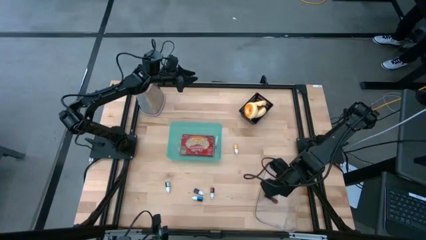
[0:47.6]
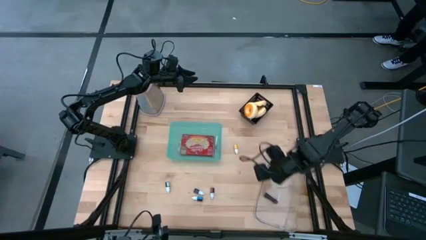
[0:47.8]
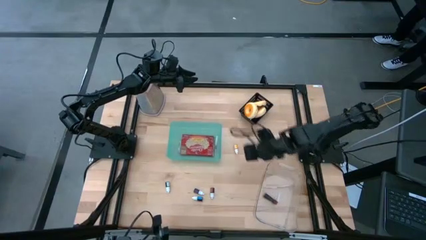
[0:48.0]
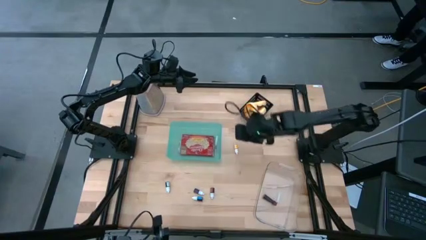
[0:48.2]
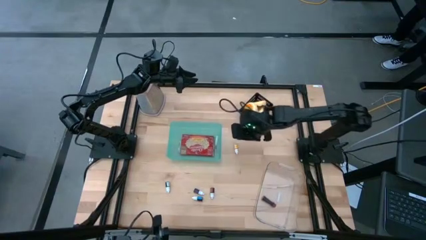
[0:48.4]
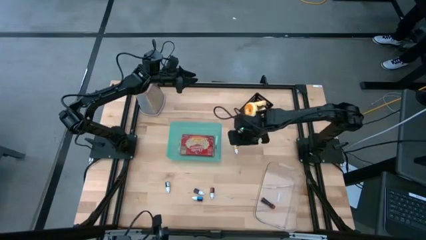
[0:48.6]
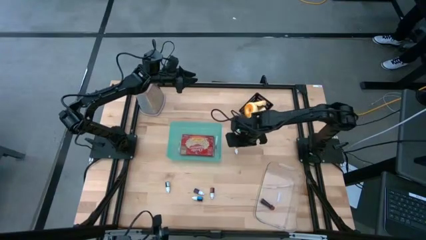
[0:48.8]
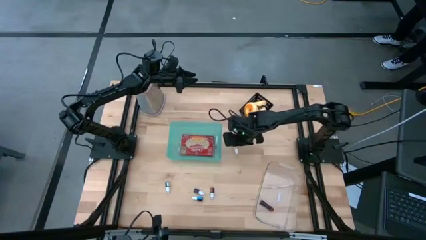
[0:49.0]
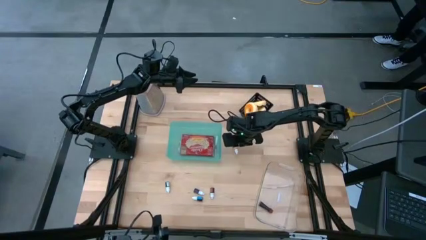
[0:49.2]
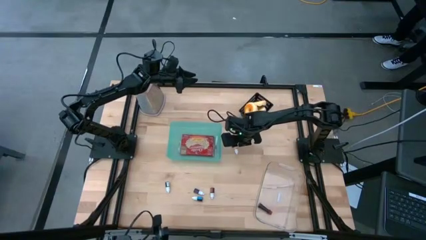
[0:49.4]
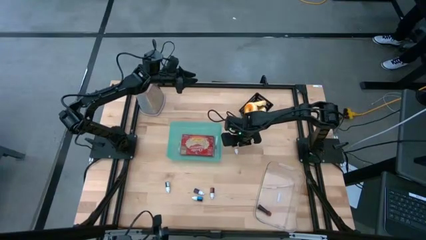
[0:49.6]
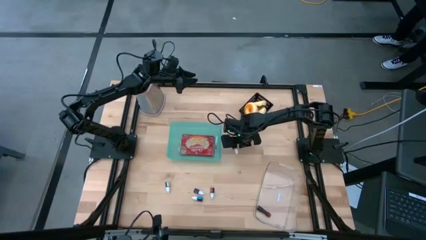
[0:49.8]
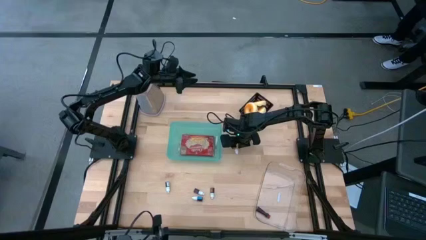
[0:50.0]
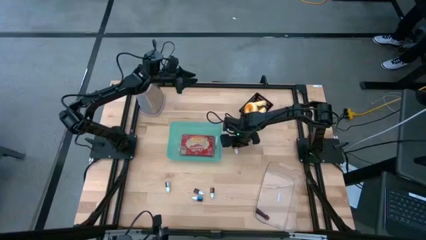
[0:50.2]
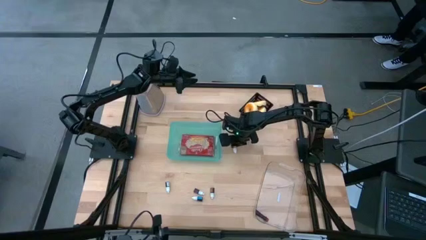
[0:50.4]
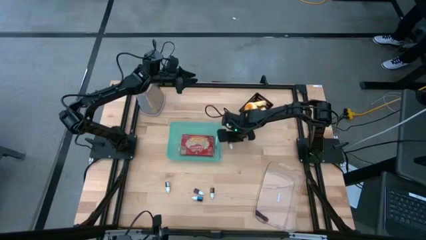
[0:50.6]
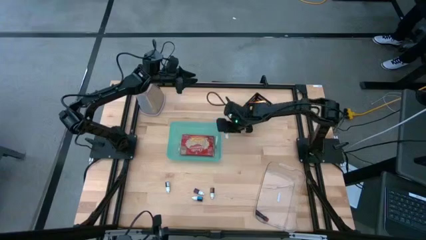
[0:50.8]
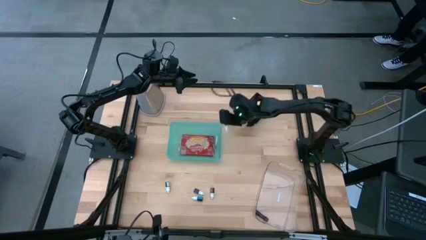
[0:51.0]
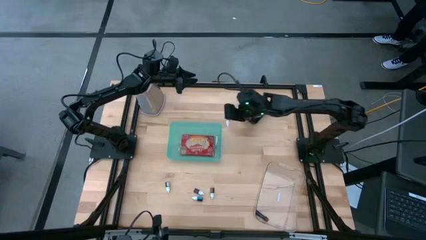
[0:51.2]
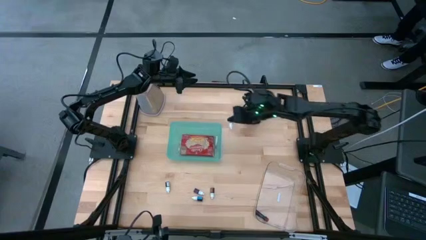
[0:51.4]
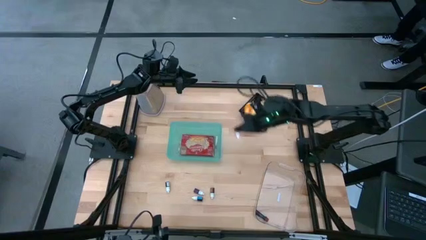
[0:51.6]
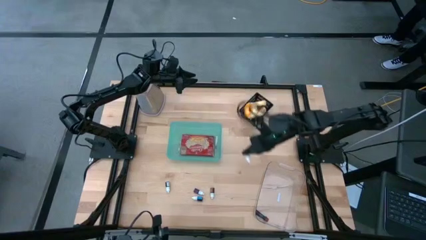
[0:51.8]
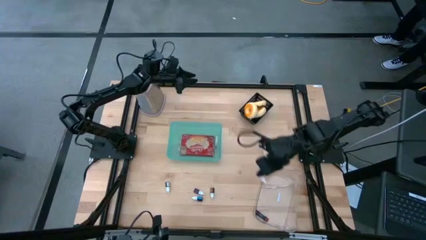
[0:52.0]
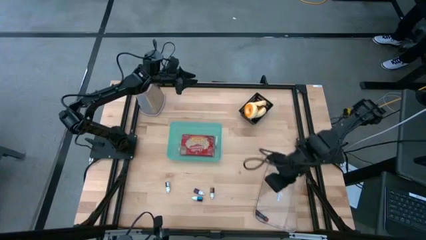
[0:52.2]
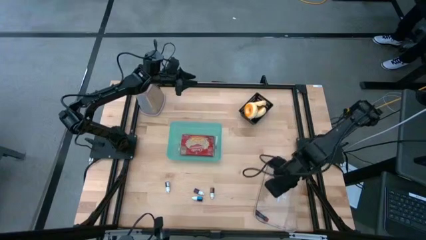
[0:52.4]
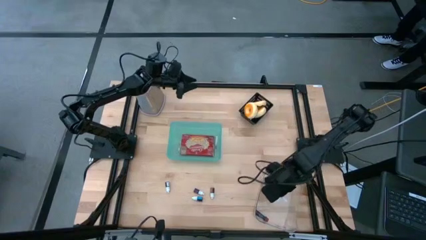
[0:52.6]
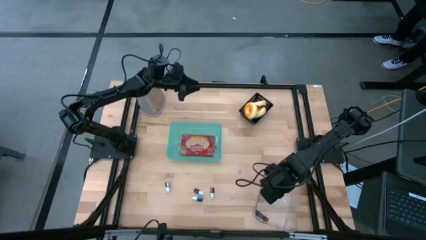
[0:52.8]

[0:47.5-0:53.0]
Put the orange food coloring bottle into the transparent bin

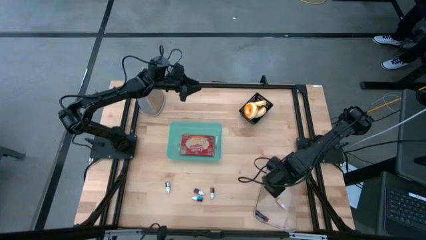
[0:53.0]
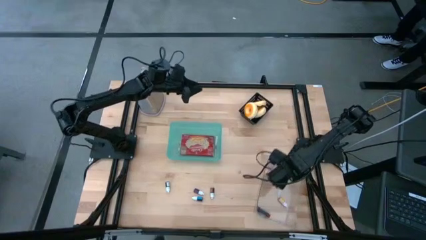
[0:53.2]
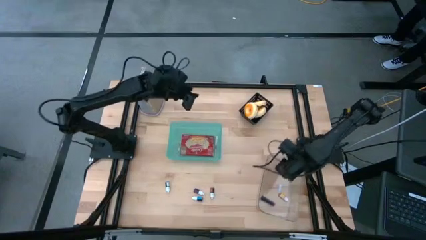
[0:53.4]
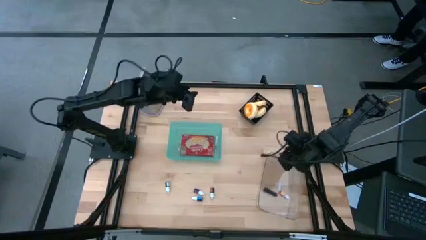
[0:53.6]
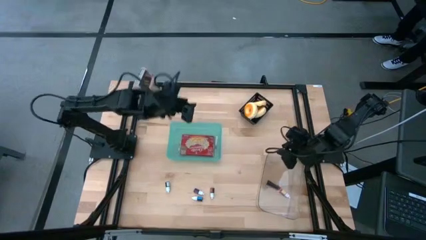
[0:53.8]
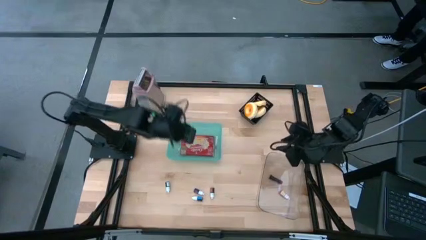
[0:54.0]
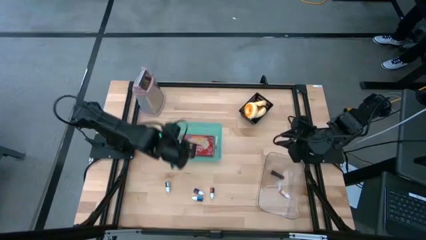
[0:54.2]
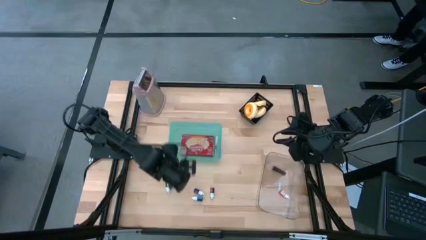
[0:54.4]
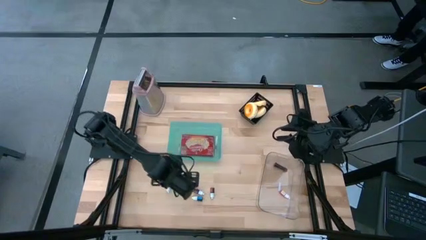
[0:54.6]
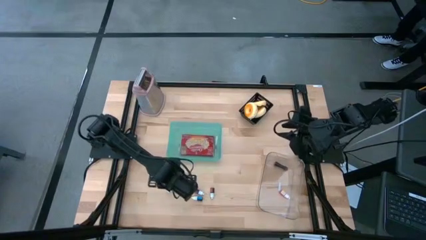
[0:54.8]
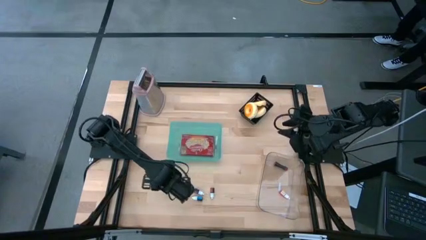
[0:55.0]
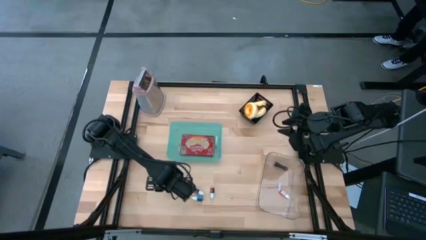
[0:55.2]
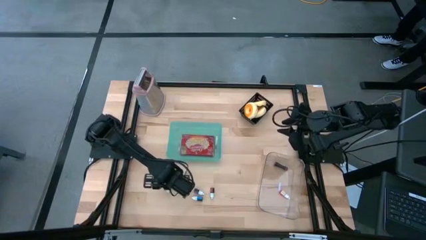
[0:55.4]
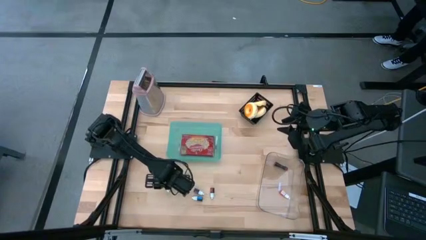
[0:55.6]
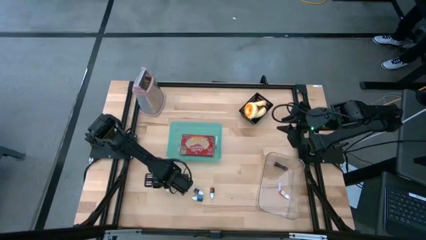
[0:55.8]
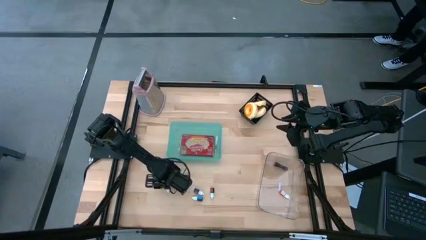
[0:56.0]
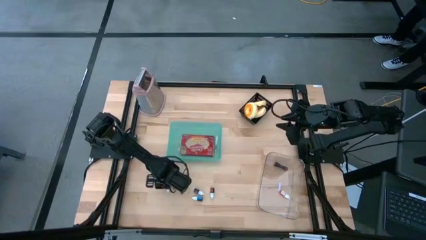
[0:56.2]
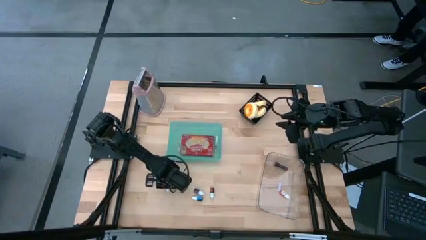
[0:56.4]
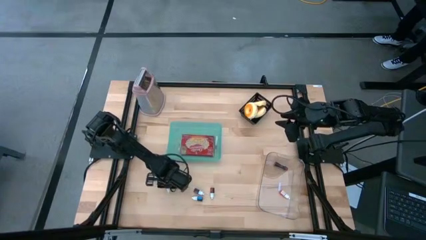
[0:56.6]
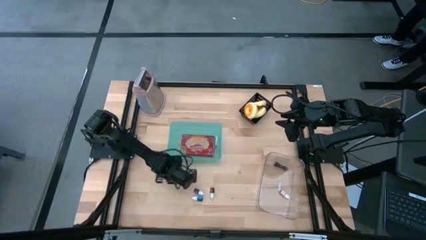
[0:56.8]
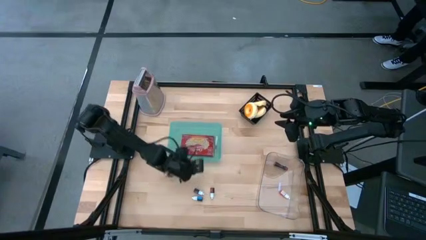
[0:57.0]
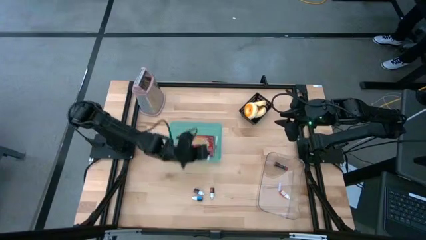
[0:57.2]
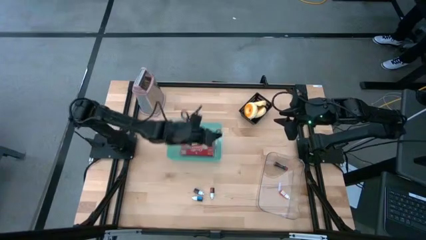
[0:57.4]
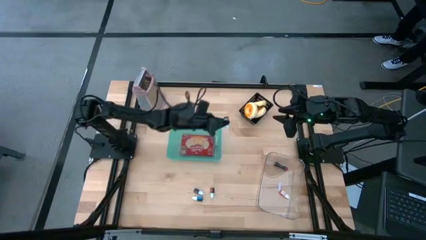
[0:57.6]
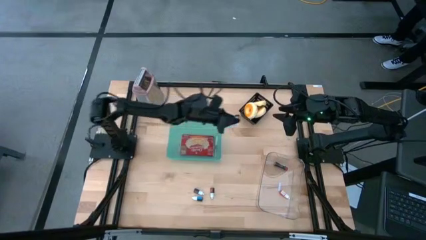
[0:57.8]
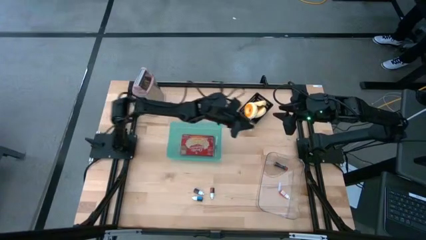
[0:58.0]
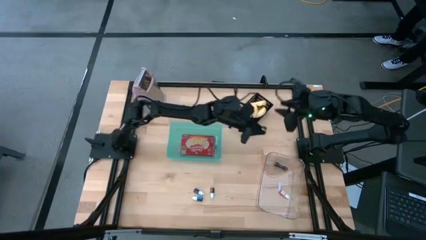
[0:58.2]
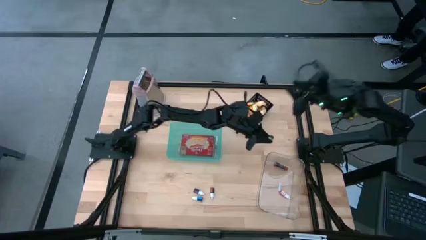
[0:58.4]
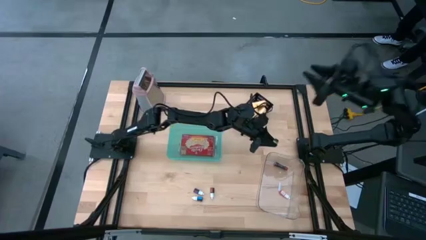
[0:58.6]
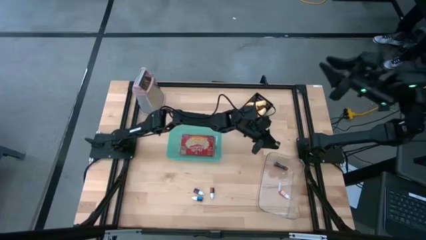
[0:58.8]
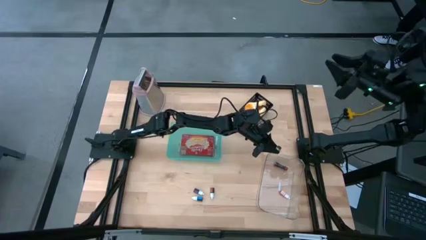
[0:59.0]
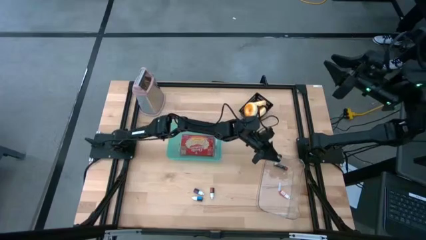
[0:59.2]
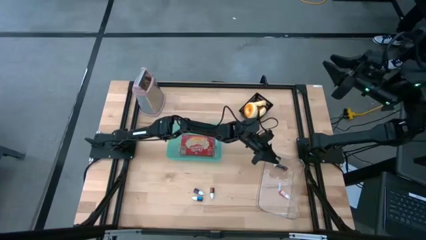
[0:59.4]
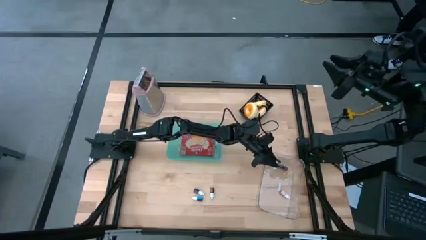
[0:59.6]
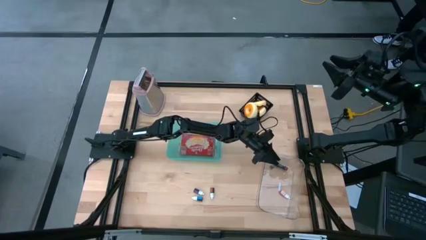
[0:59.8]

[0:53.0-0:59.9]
Put the green food coloring bottle into the transparent bin
